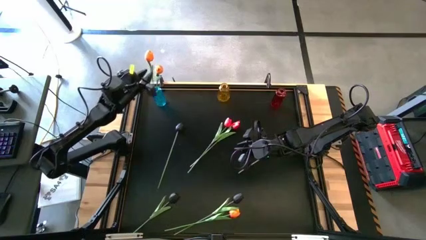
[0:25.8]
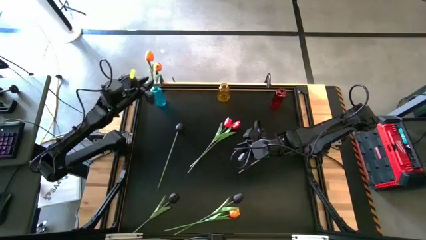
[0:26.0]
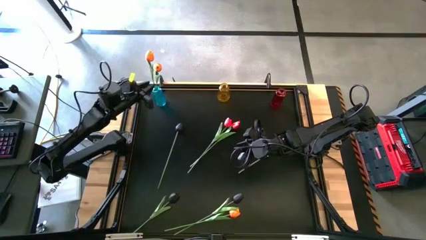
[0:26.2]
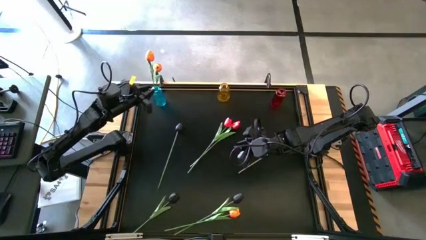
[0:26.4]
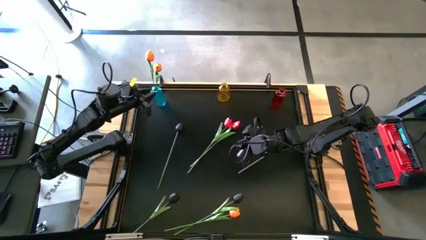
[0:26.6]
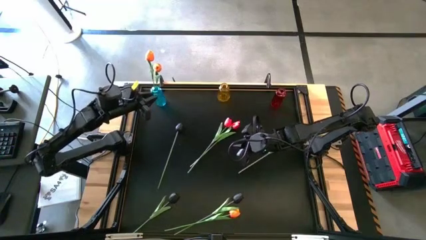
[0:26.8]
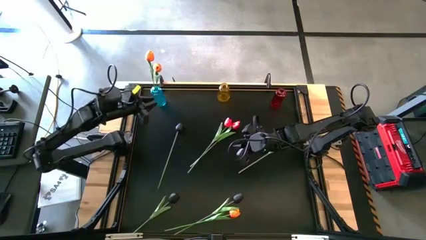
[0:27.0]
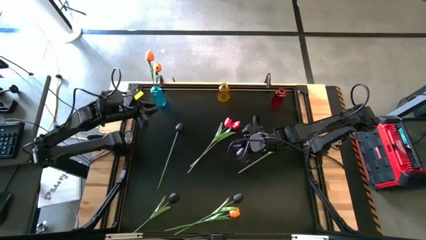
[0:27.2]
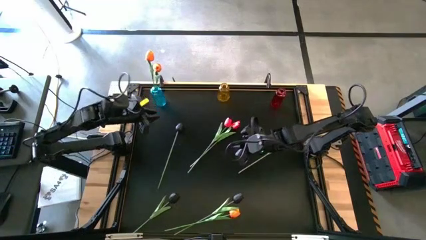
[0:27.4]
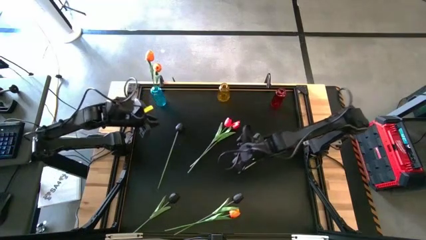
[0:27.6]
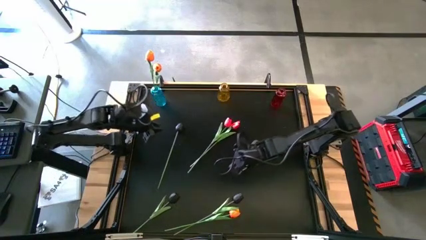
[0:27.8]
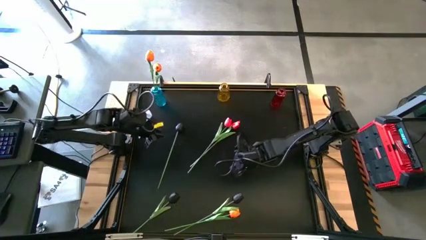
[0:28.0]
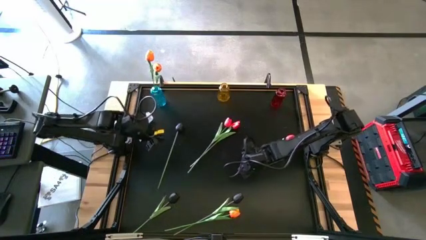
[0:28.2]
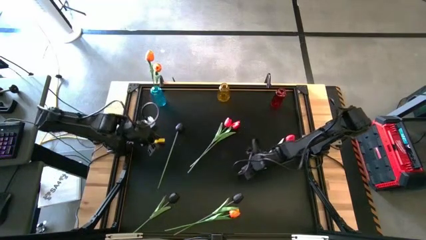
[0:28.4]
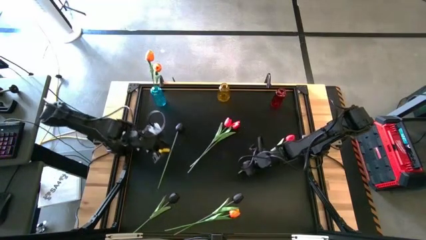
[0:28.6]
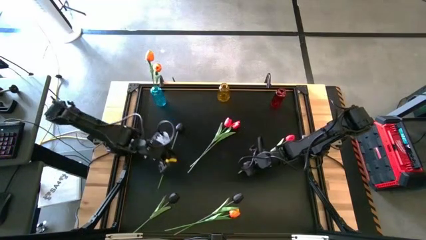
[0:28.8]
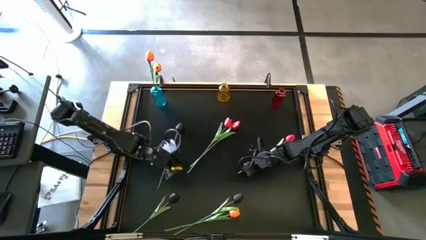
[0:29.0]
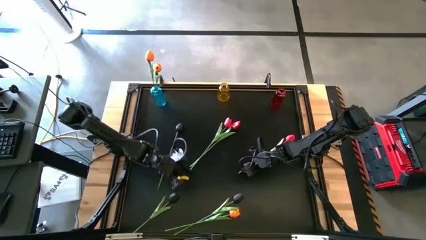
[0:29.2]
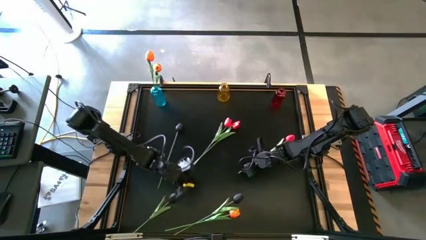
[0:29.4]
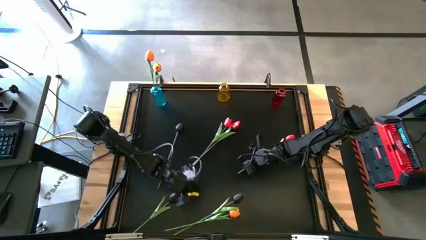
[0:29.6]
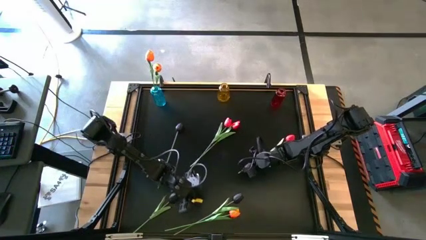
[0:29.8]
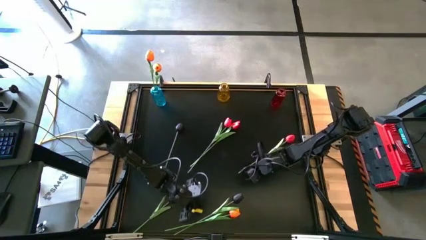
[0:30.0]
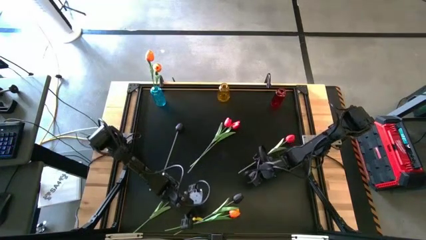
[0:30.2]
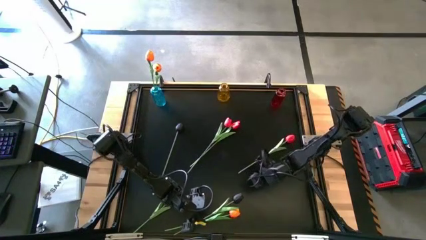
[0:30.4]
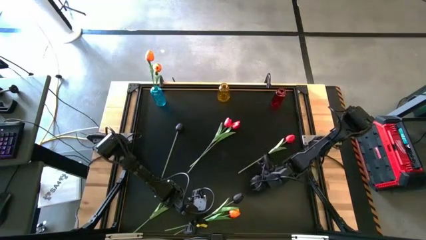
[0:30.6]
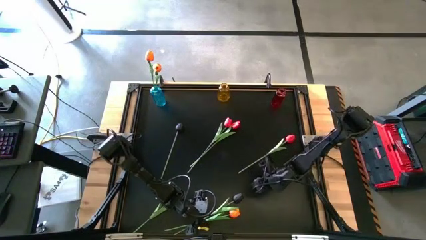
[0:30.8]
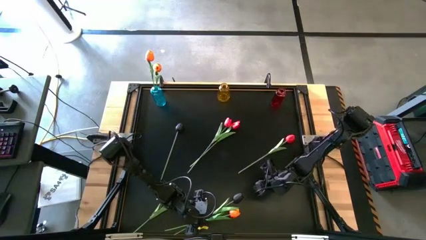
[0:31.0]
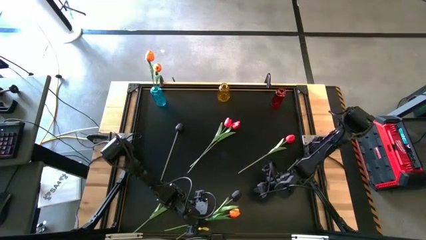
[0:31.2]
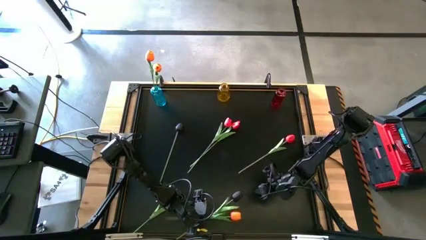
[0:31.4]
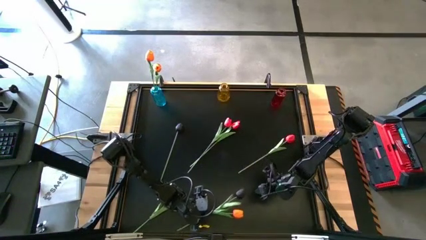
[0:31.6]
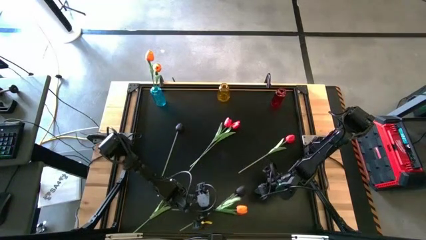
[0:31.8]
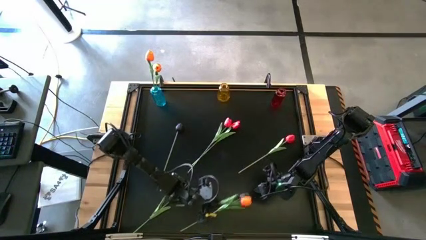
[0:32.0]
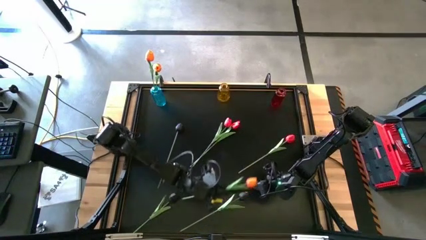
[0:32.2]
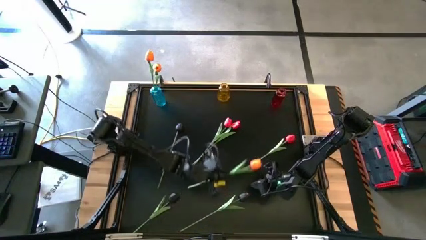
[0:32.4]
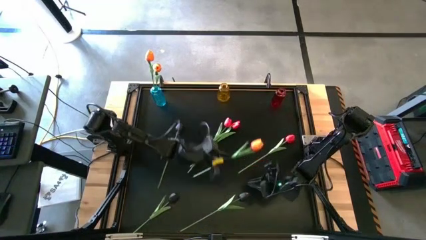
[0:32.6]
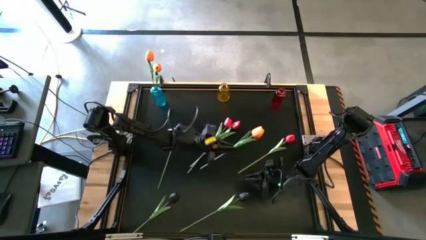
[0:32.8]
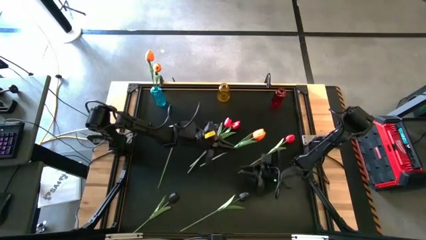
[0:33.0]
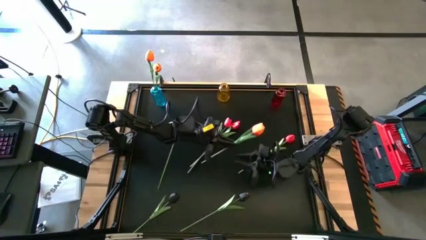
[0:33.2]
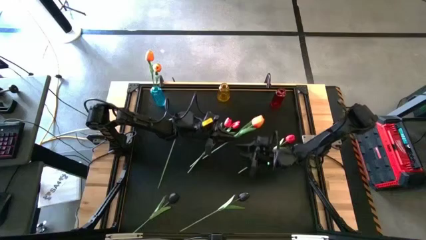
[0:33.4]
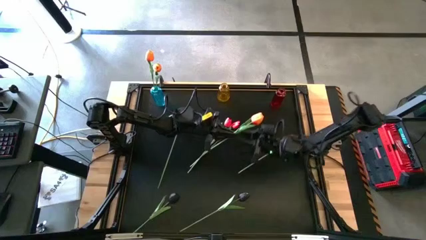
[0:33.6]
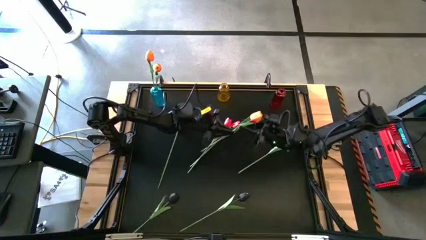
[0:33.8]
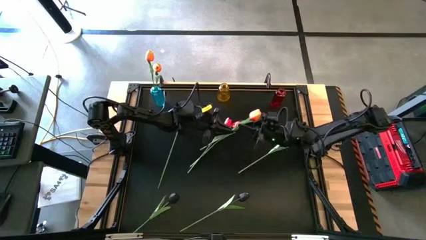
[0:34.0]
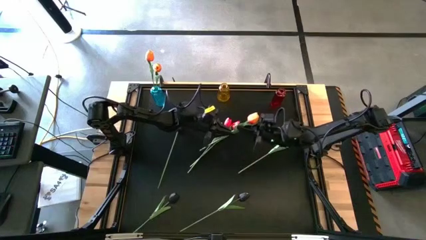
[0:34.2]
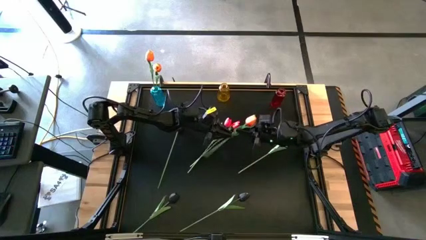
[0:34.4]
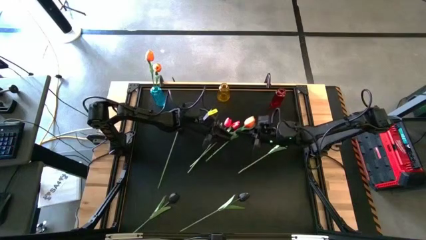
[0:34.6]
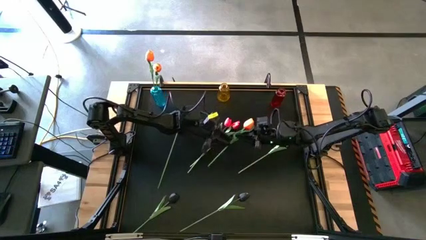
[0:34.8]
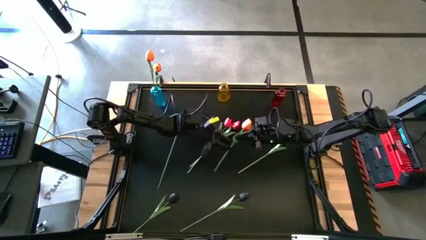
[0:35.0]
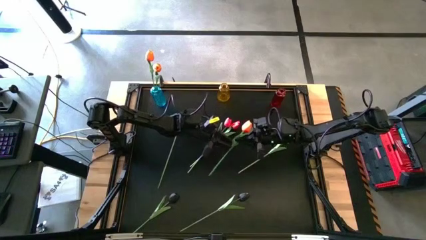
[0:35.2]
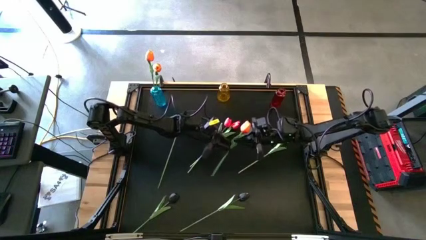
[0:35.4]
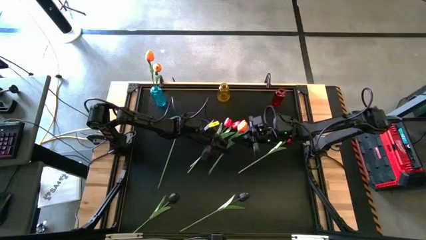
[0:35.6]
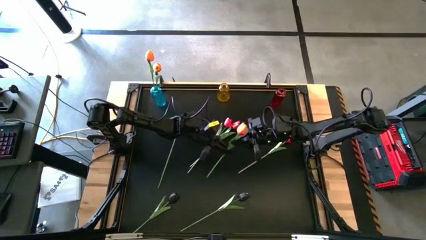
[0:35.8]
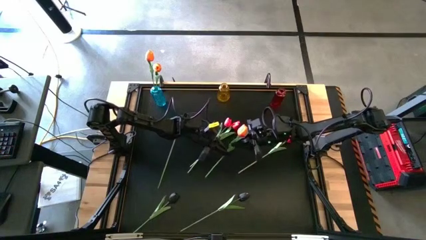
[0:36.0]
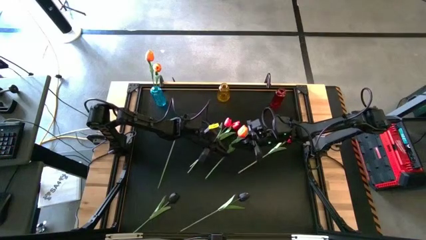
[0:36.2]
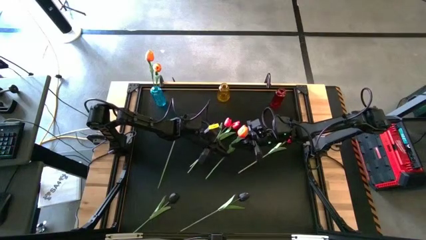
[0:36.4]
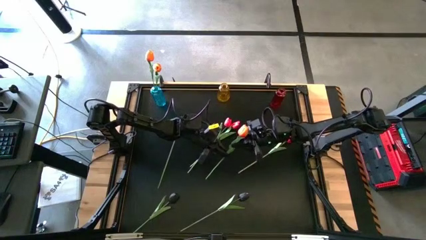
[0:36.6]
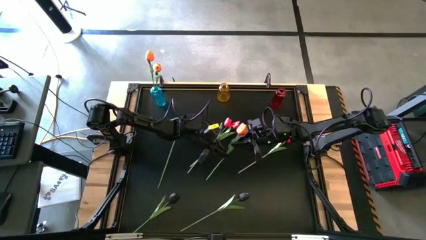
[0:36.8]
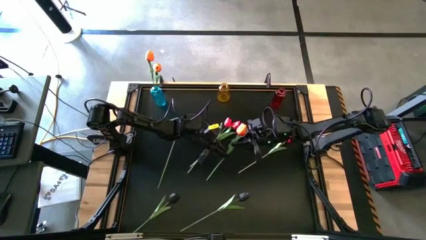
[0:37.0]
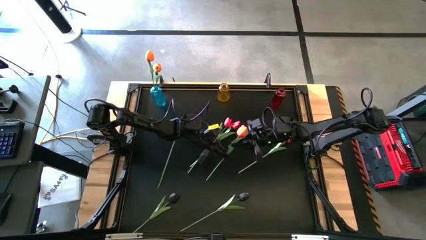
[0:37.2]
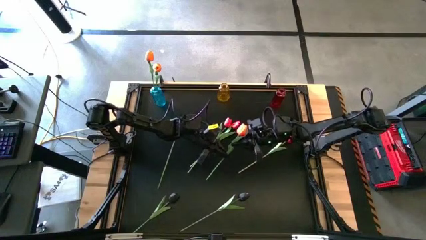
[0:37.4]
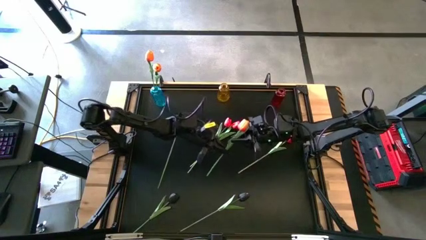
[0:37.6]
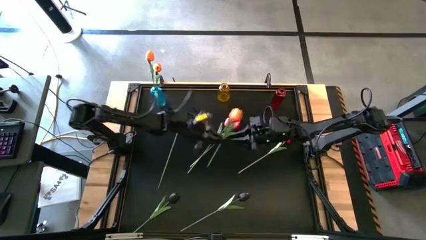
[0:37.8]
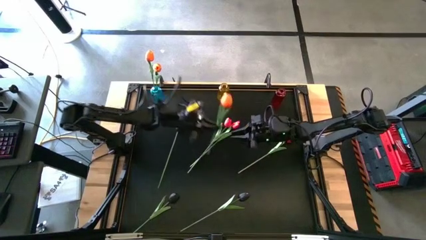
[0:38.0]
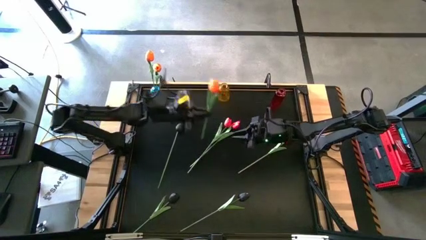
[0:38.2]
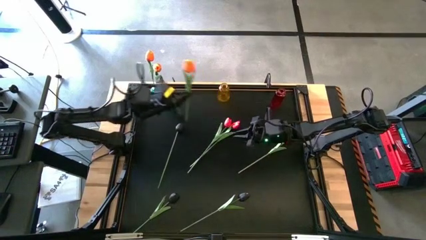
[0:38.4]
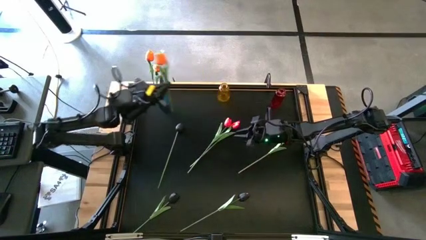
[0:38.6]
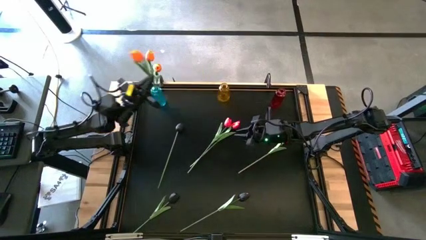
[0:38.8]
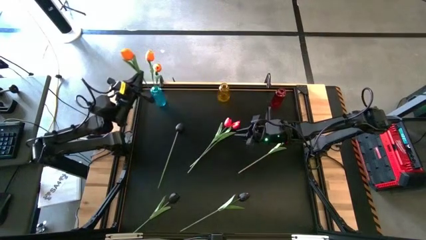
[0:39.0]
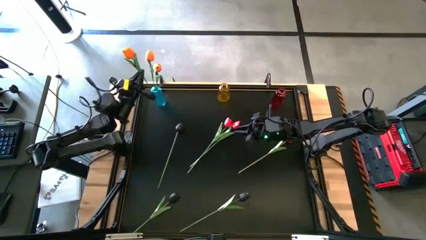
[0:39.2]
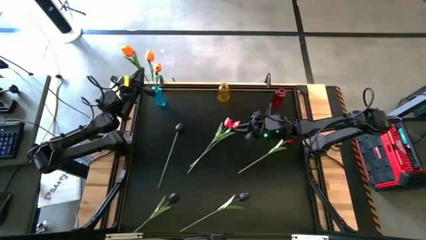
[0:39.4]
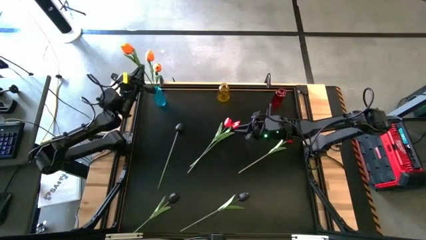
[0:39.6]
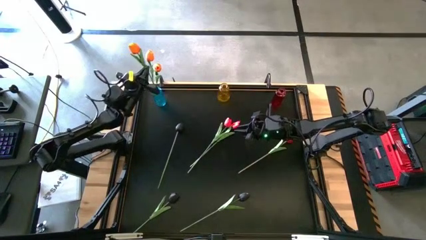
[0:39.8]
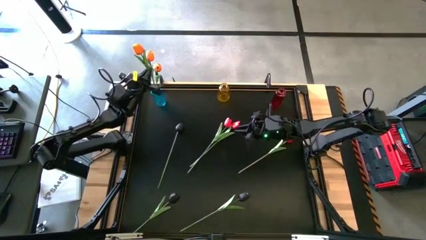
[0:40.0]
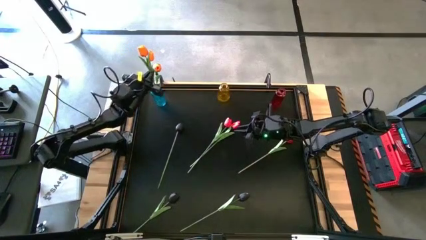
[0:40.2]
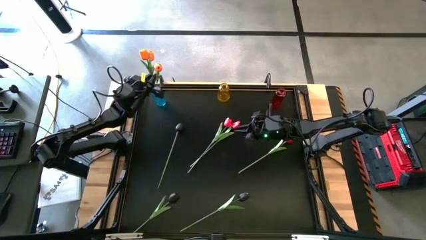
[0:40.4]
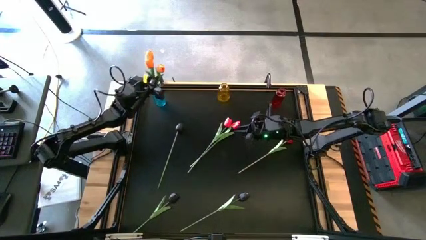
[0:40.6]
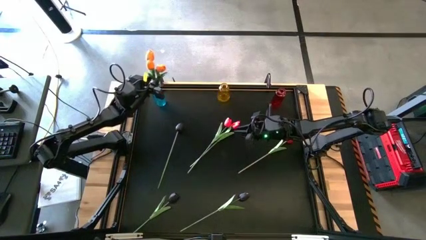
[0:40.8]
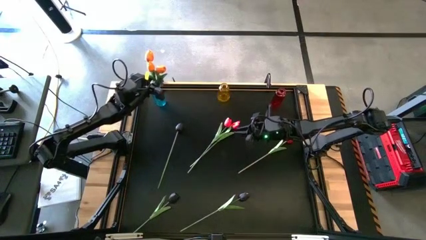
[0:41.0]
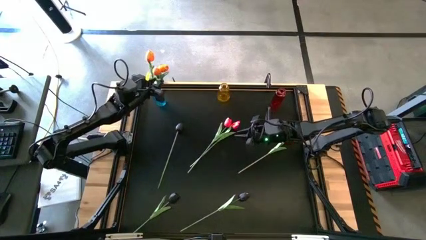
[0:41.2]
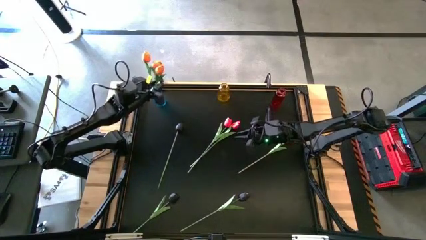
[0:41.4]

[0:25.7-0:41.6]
Task: Sort flowers into vase by color
Put the orange flower into the blue vase

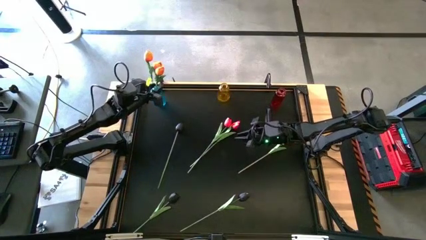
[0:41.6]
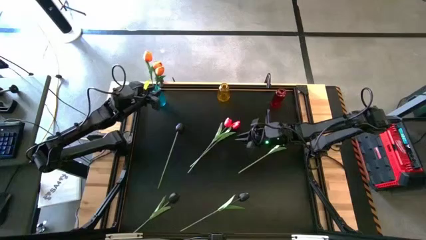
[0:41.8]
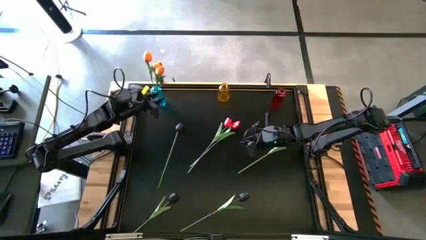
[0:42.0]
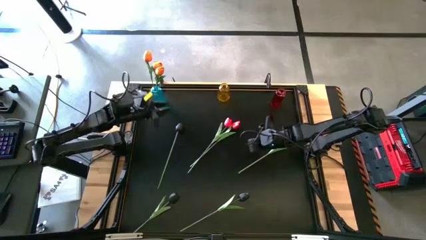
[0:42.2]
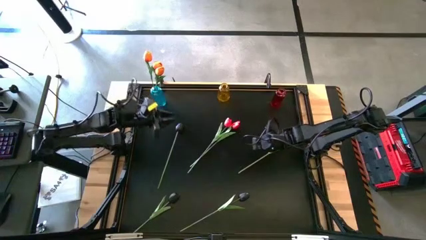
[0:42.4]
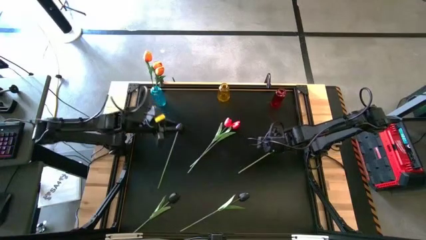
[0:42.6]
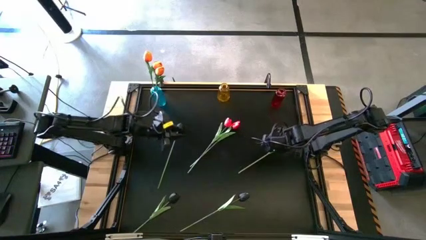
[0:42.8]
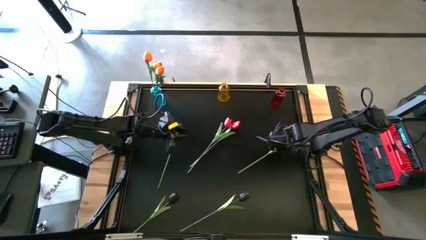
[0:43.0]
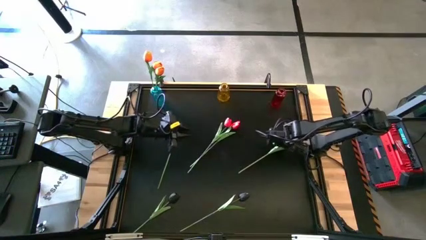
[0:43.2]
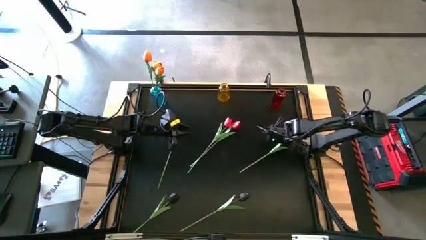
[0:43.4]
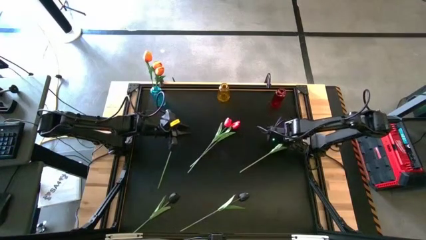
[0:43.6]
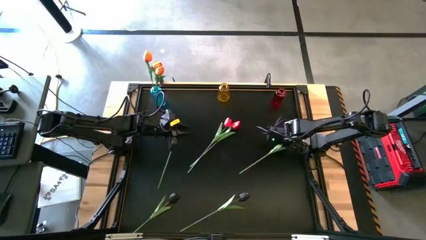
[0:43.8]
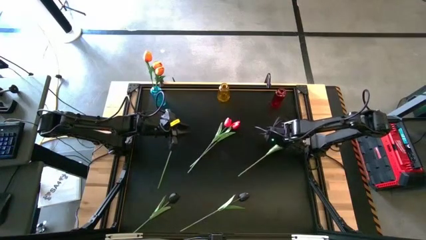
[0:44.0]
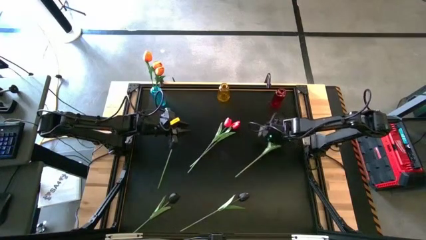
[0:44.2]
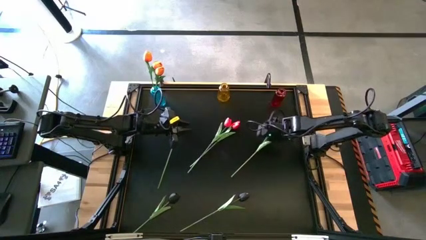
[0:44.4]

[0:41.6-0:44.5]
Put the right red flower into the red vase
